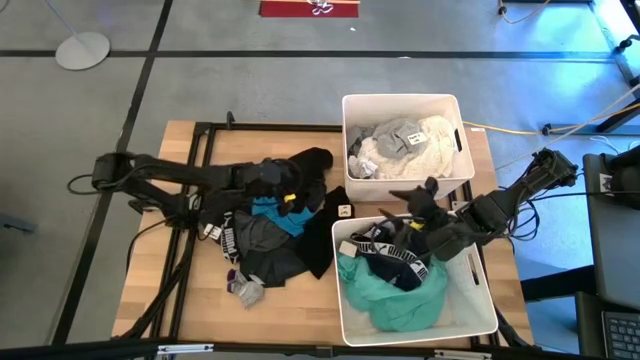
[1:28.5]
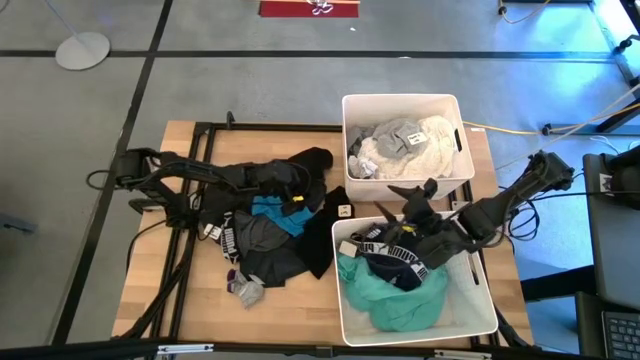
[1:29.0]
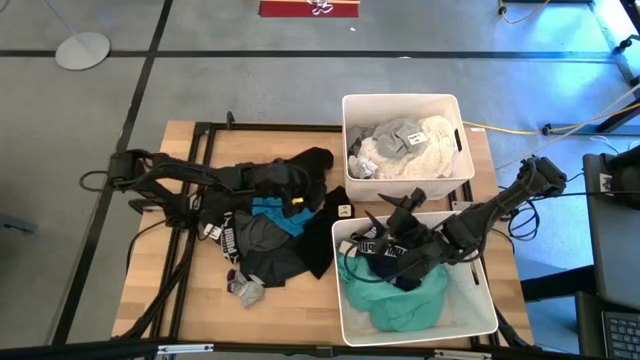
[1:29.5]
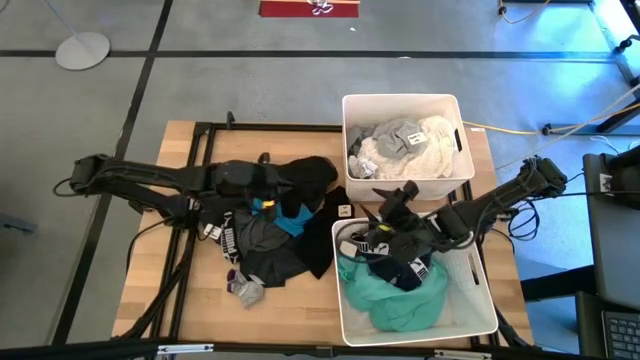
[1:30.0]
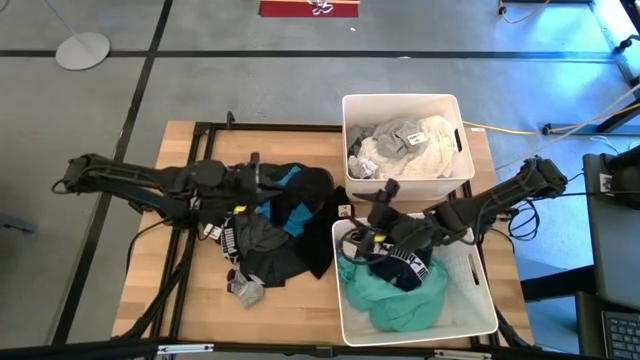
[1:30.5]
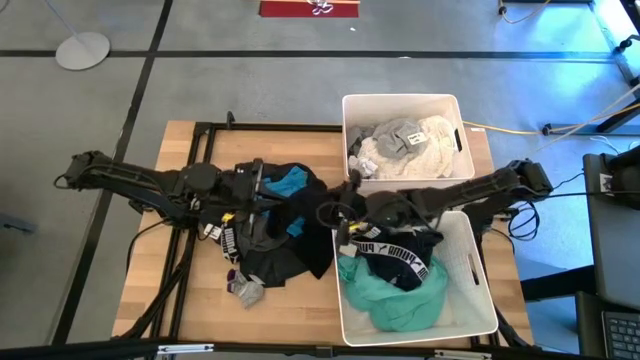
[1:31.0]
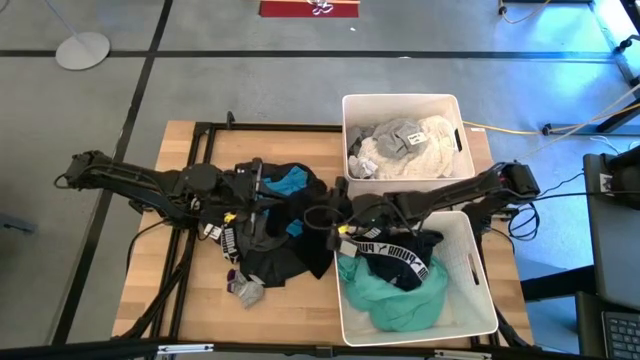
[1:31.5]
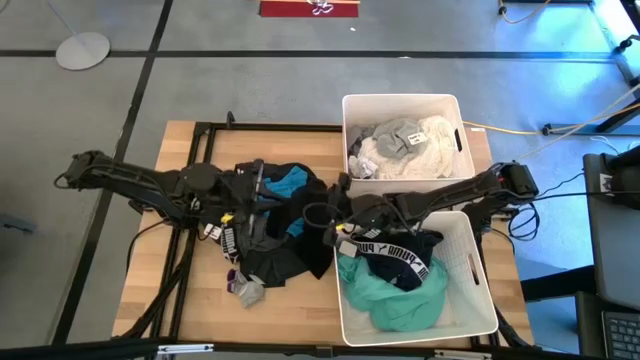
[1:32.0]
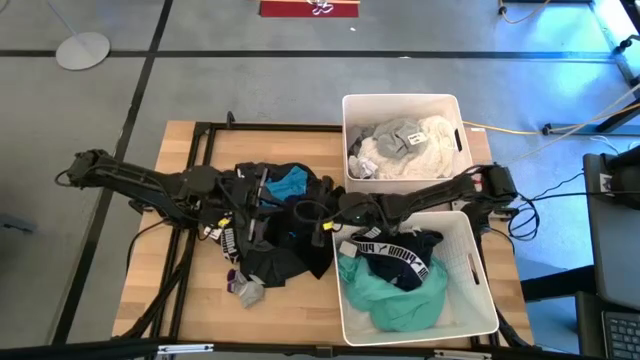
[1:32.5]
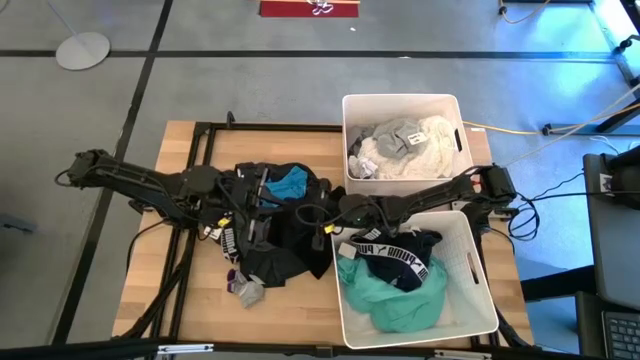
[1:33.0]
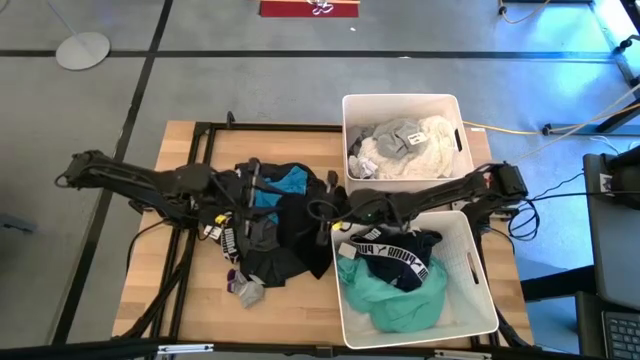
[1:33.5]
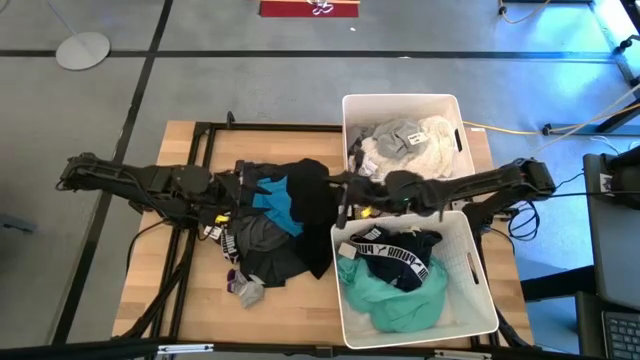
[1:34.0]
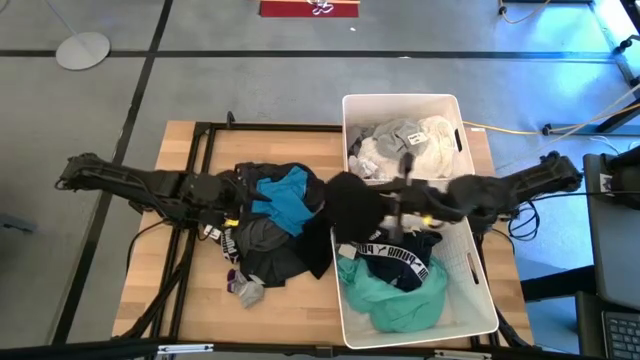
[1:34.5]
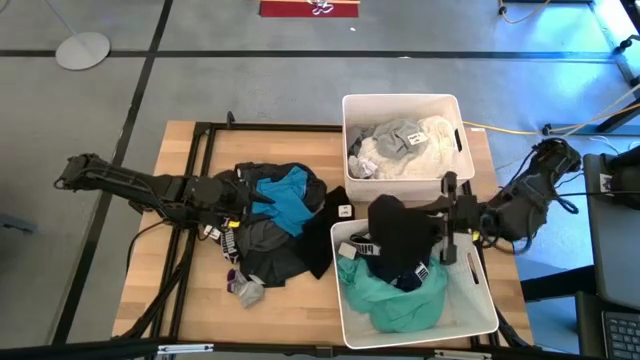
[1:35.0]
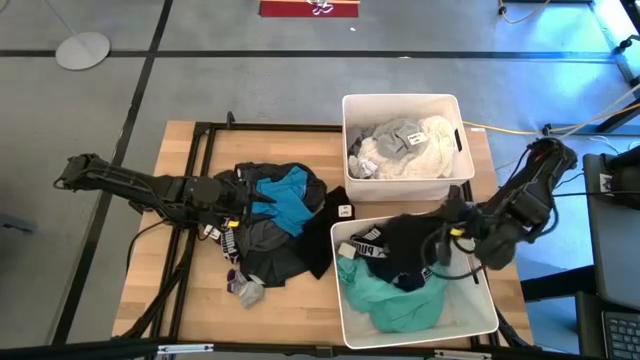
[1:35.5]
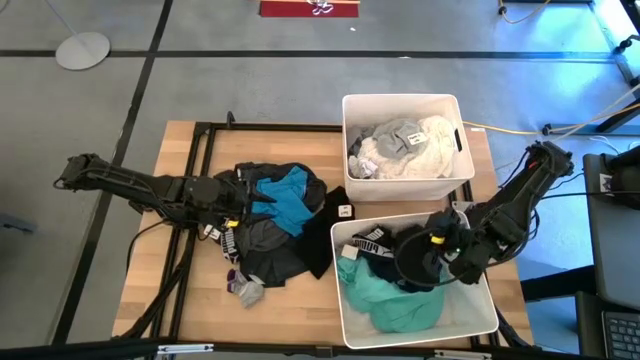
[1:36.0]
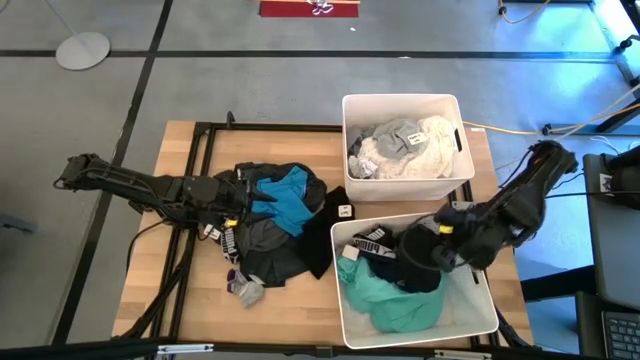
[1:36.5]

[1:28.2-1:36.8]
Task: Sort clothes
Put the top black shirt into the bottom white laundry bin

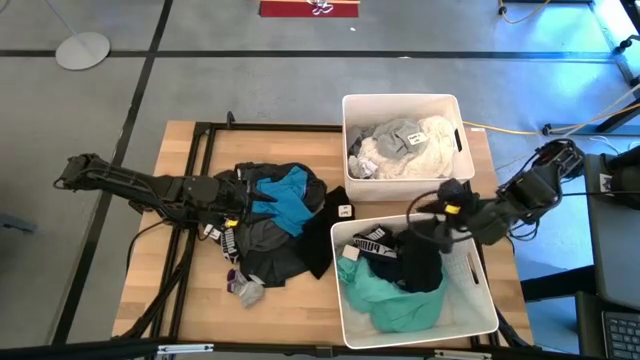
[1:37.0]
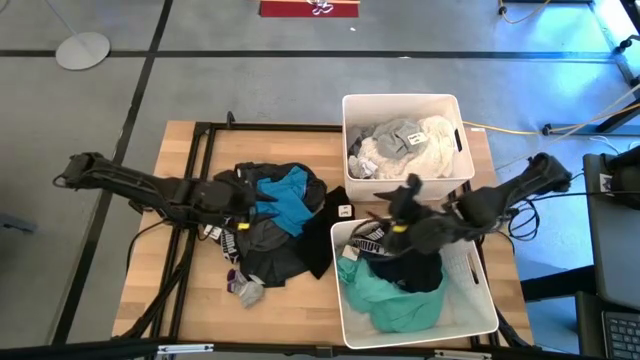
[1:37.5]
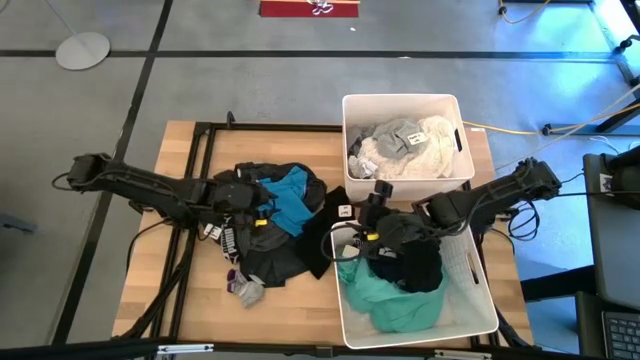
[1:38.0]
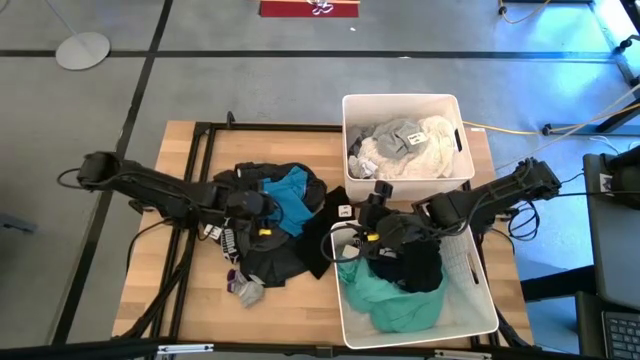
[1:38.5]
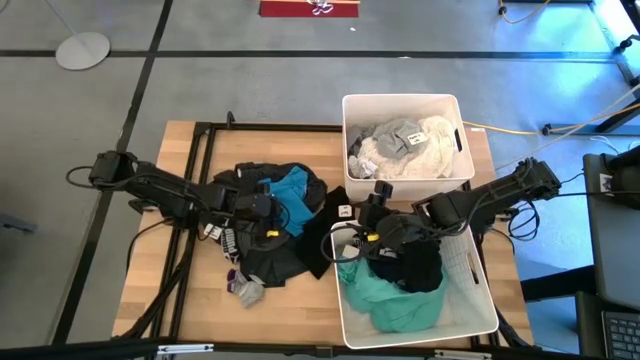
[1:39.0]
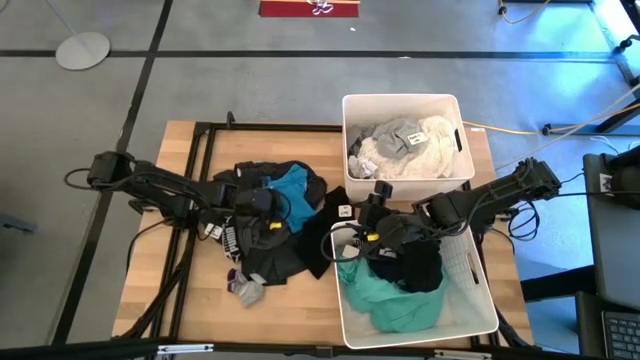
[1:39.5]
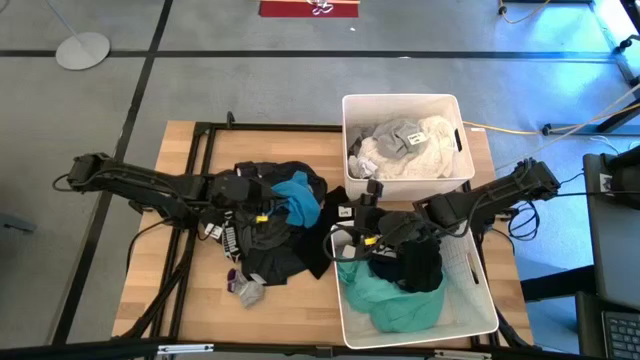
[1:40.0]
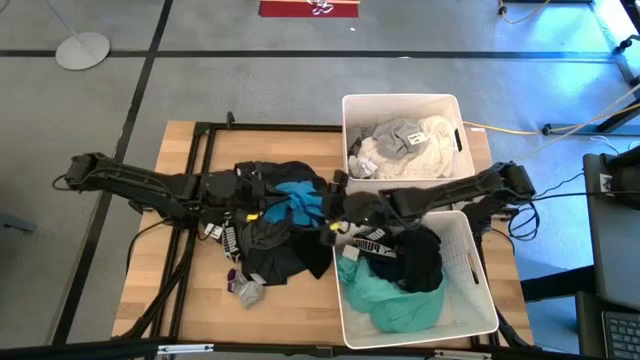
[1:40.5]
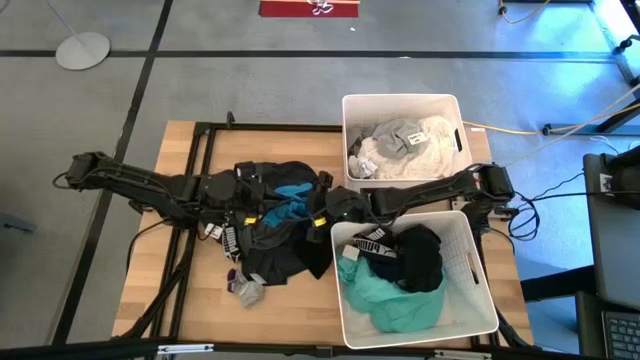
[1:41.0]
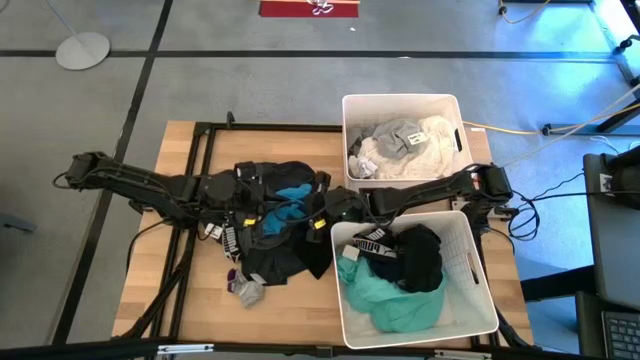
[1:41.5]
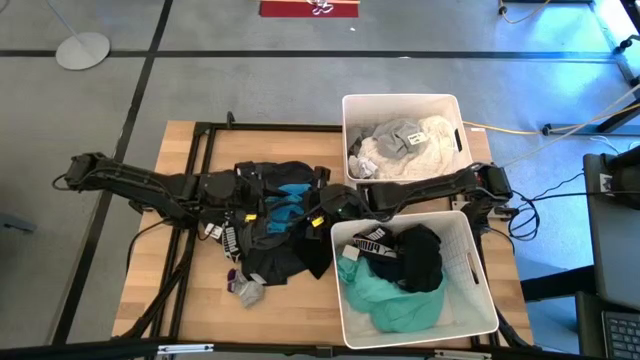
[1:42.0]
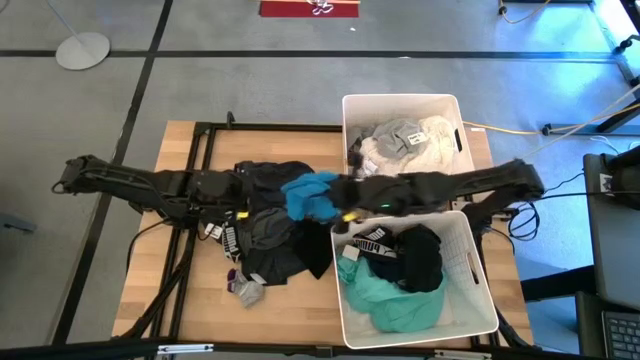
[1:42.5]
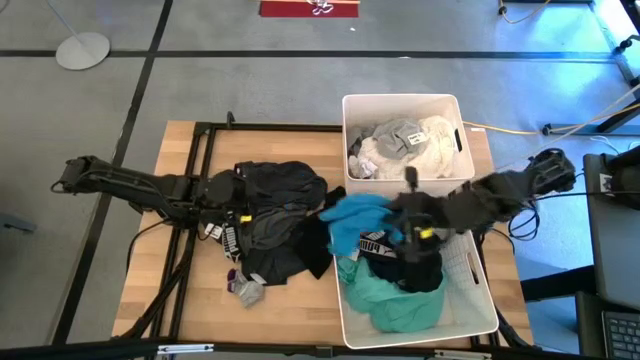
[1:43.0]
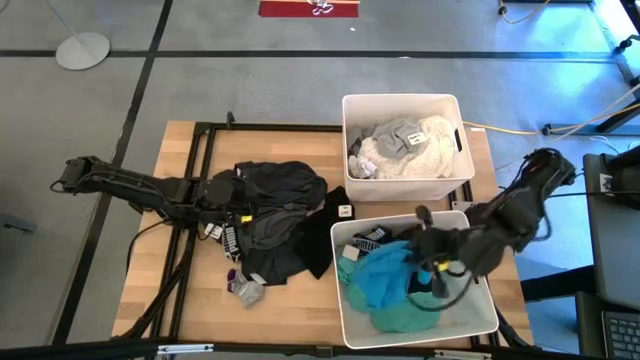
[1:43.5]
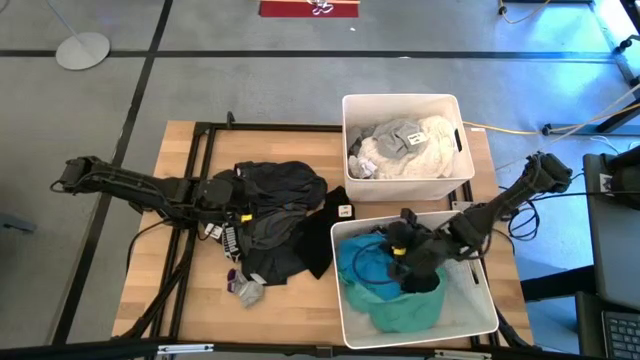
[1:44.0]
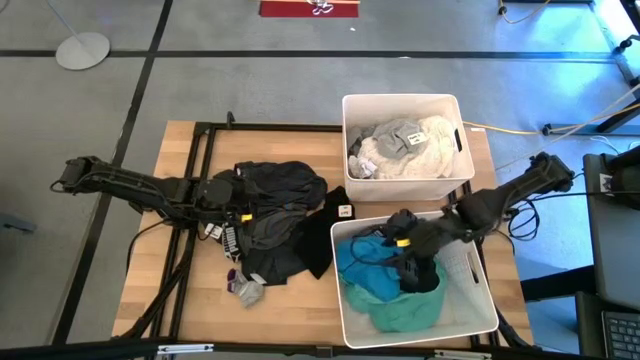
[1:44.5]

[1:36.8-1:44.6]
Put the light blue pants into the bottom white laundry bin

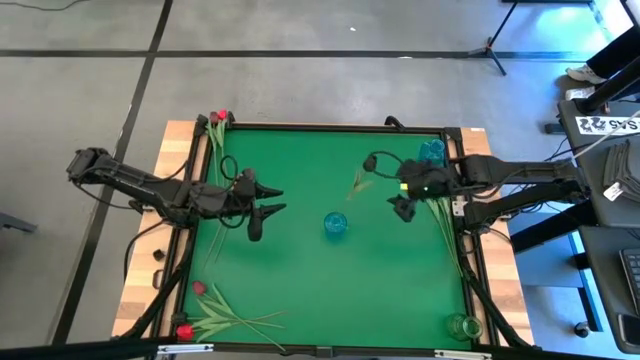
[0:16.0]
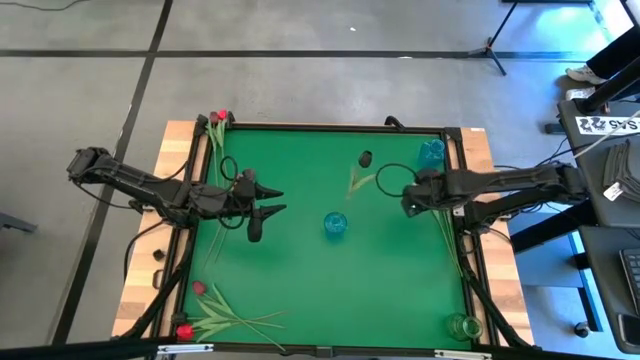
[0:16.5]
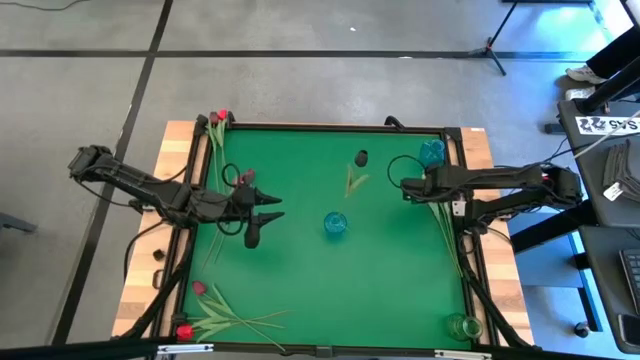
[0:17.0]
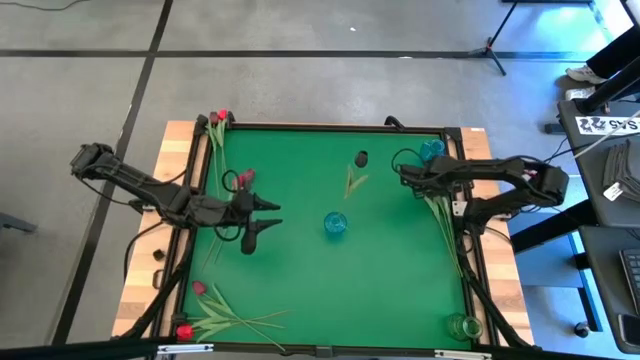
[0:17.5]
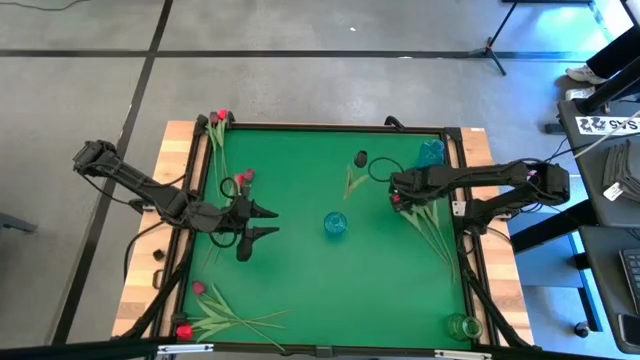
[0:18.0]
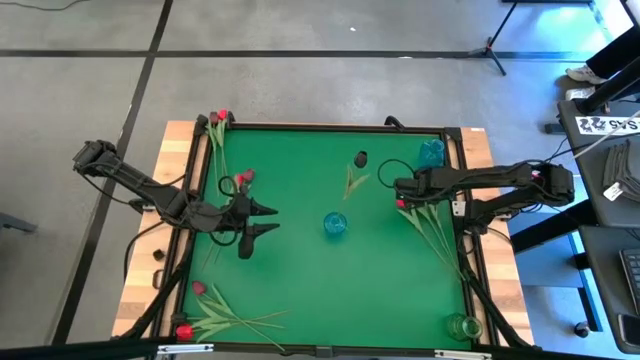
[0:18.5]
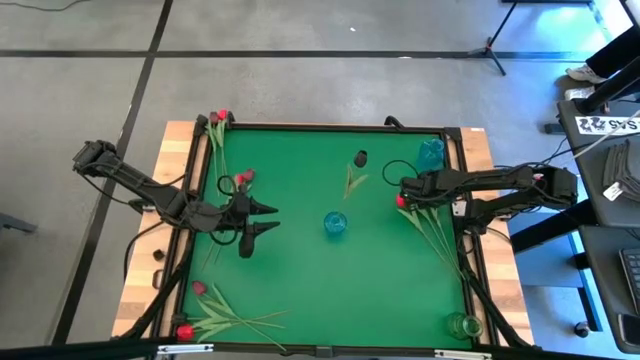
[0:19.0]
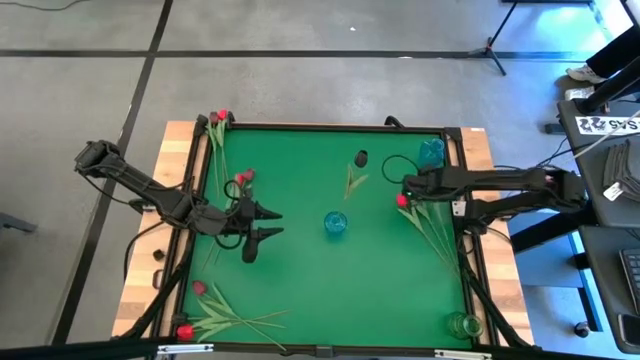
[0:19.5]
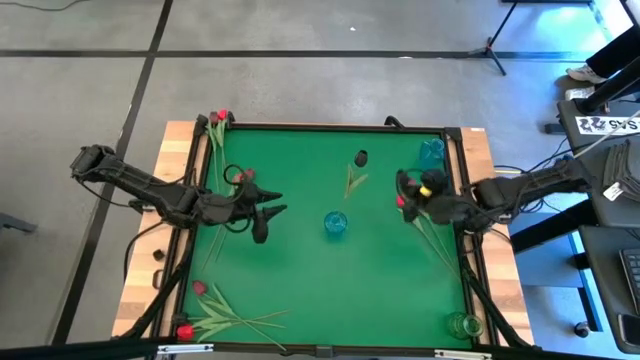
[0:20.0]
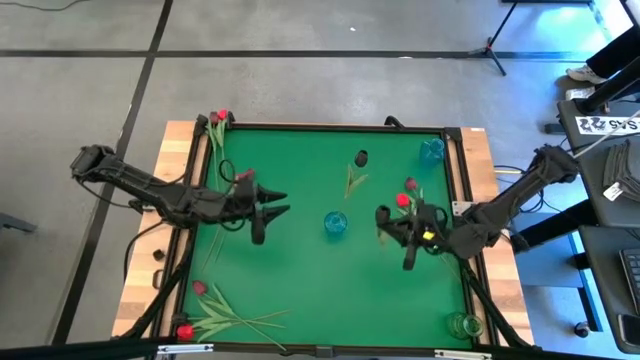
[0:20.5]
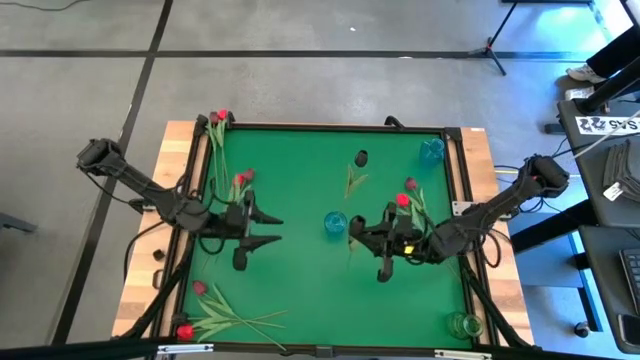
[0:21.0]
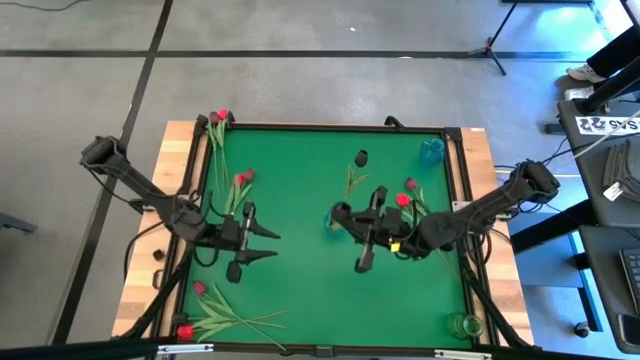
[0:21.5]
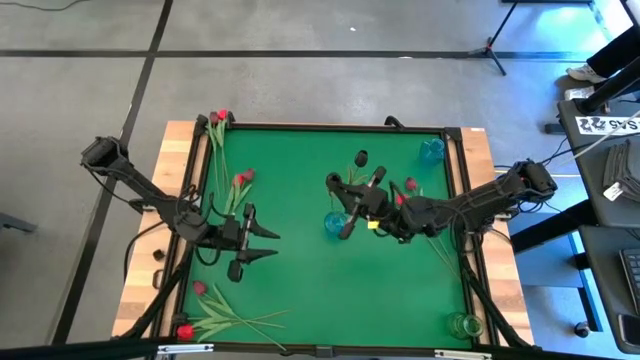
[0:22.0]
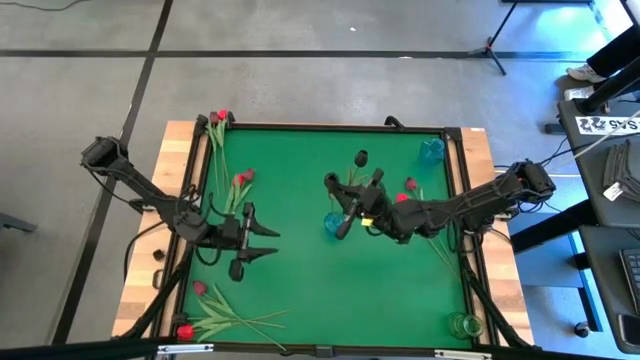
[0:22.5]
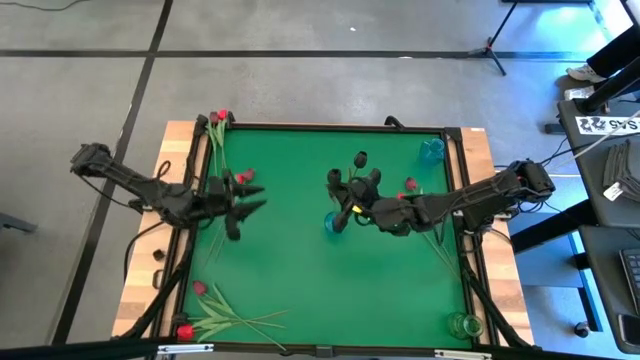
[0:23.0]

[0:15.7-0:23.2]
Task: Sort flowers into vase by color
Put the black tulip into the bottom blue vase
